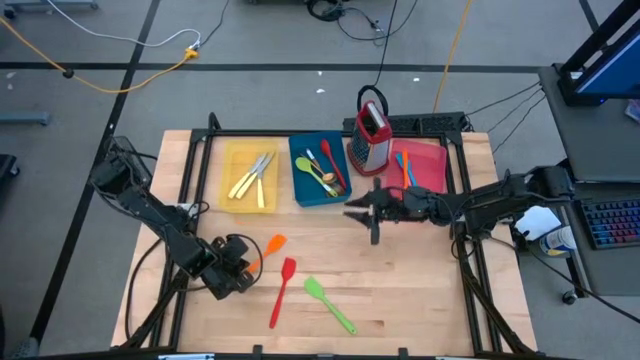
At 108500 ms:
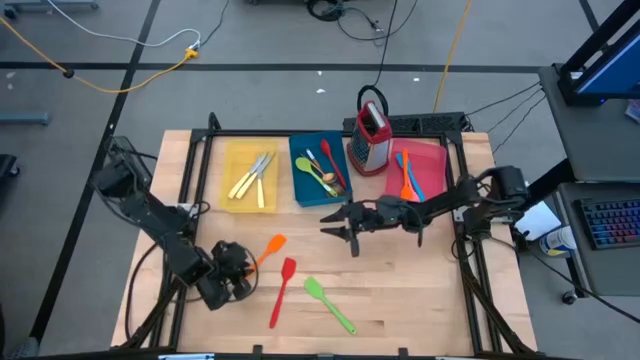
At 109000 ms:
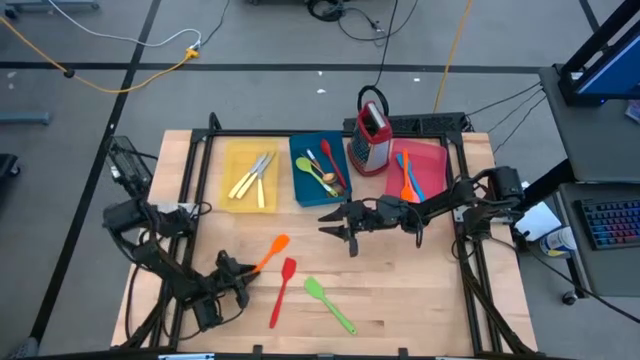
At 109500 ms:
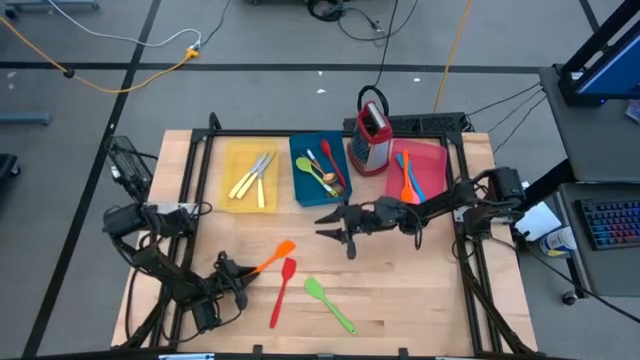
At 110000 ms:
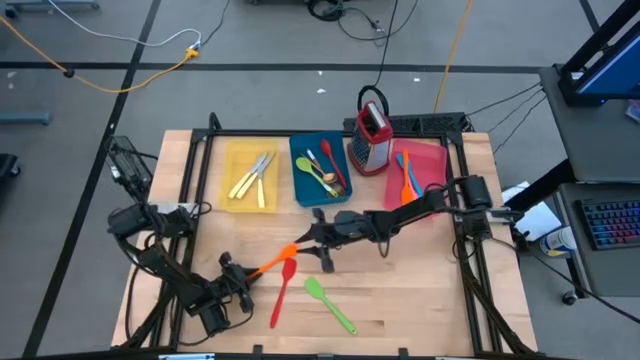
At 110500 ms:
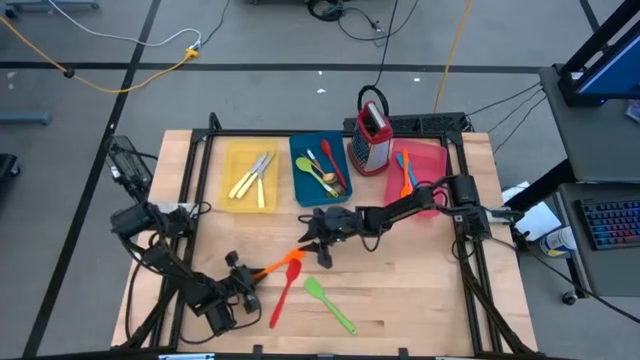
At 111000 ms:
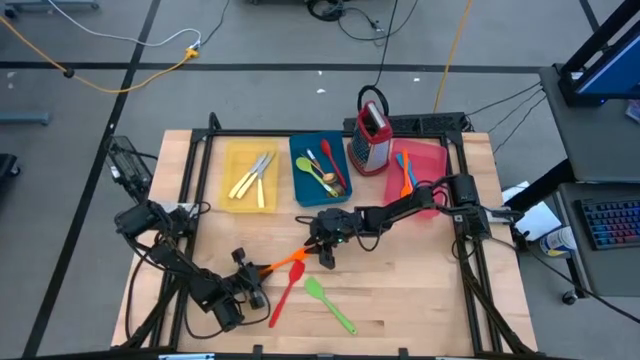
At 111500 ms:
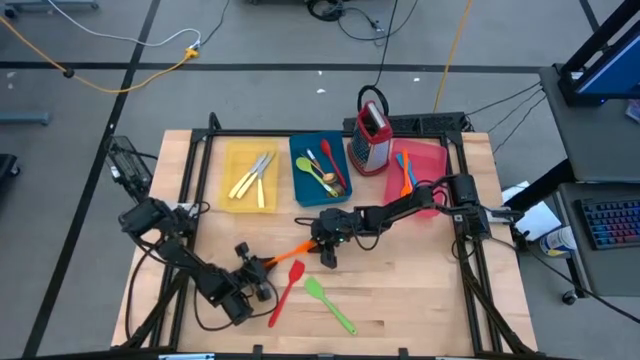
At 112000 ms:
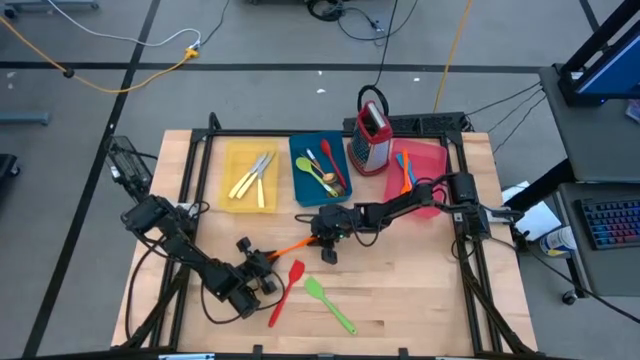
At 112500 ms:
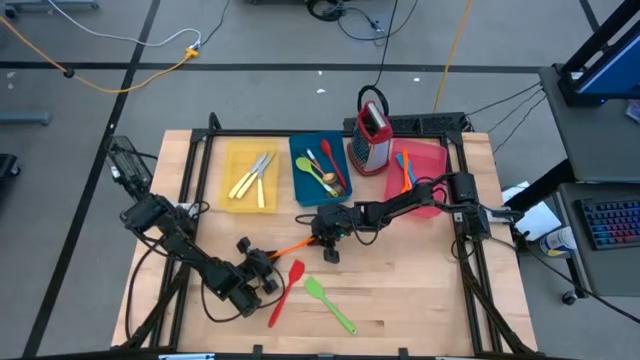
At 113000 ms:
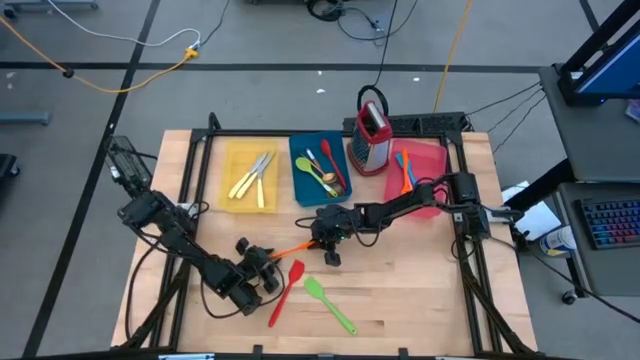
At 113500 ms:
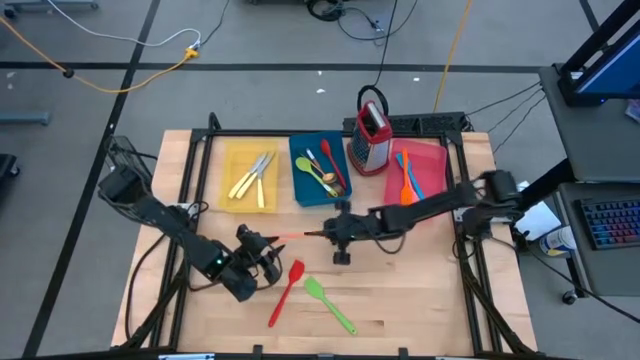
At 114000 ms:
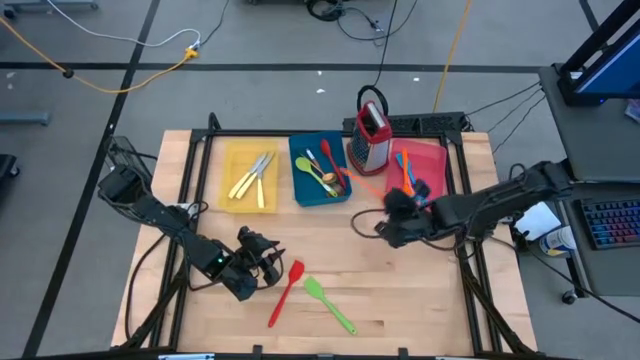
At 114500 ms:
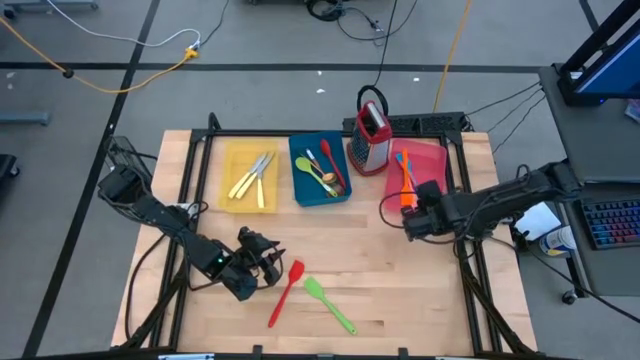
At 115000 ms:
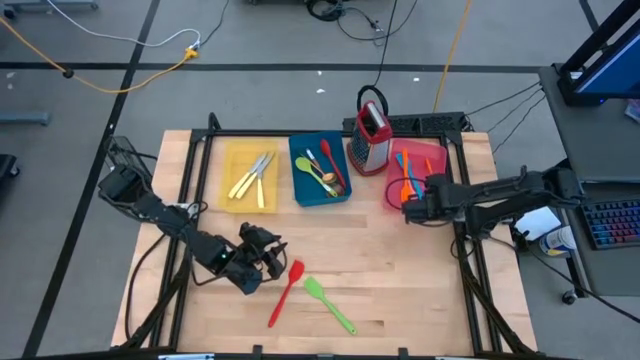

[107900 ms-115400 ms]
Task: Pick & Place Kitchen Items
Put the orange spatula into the pink bin

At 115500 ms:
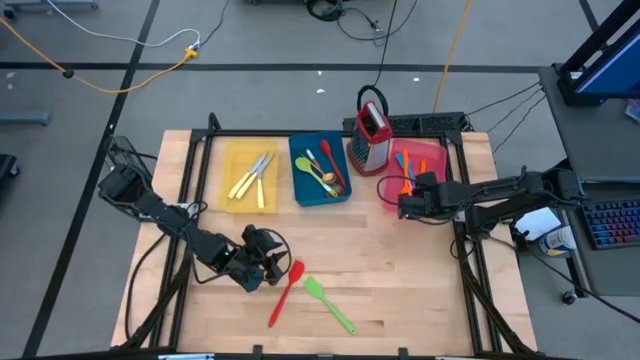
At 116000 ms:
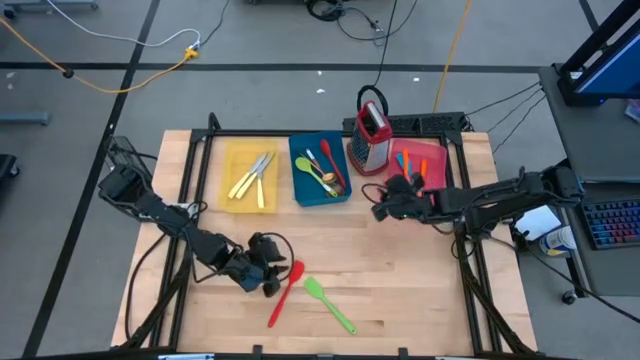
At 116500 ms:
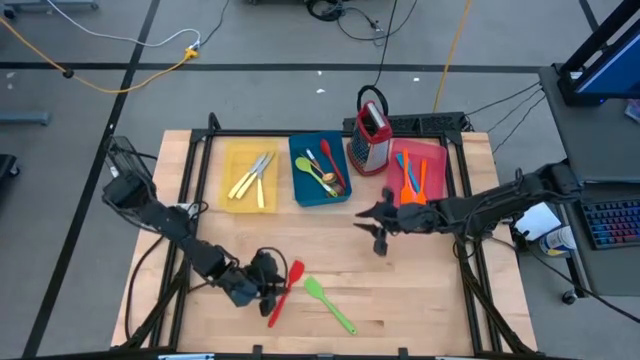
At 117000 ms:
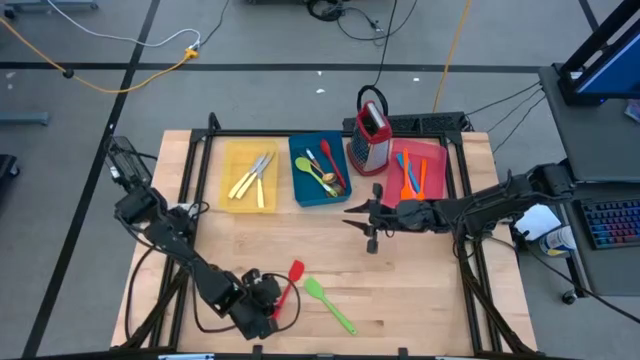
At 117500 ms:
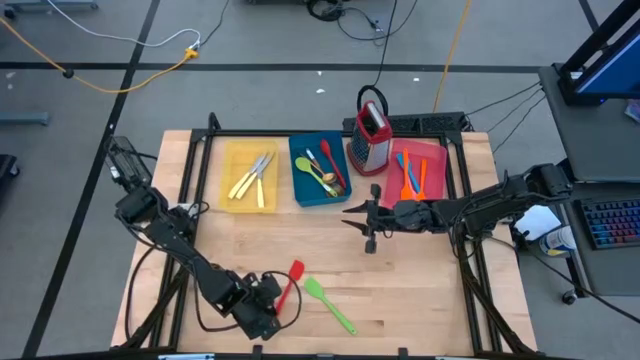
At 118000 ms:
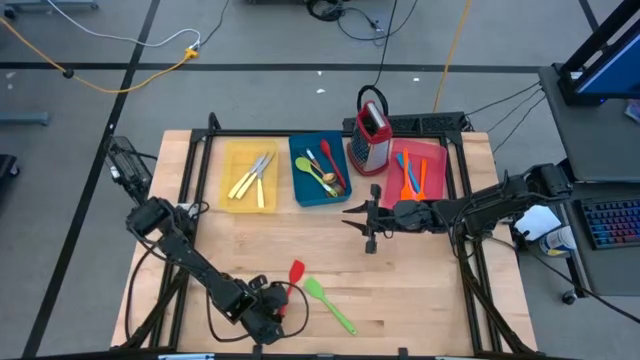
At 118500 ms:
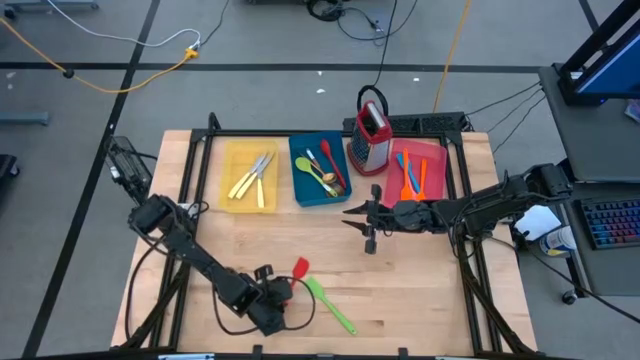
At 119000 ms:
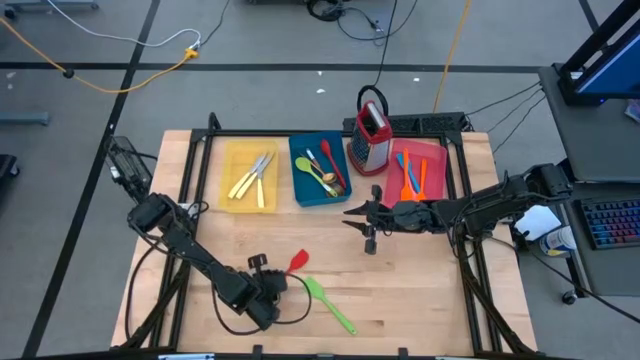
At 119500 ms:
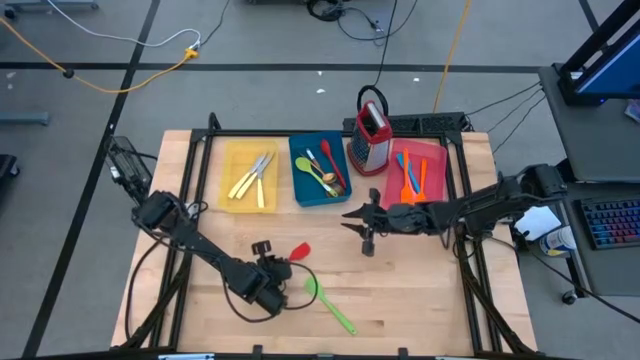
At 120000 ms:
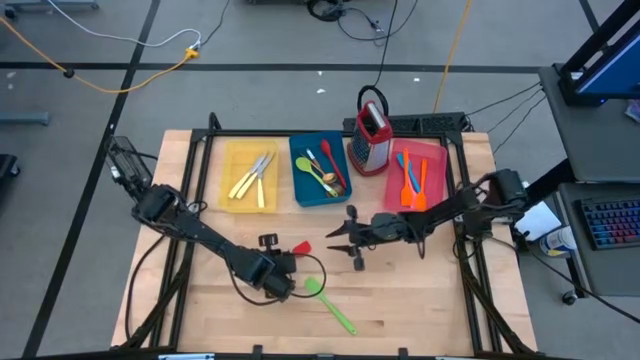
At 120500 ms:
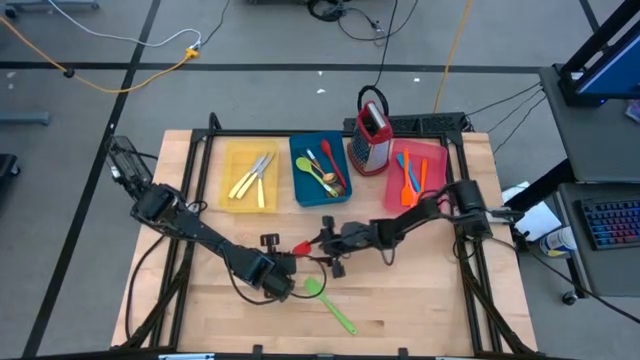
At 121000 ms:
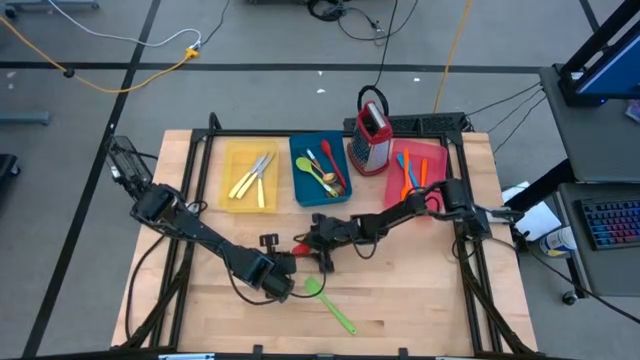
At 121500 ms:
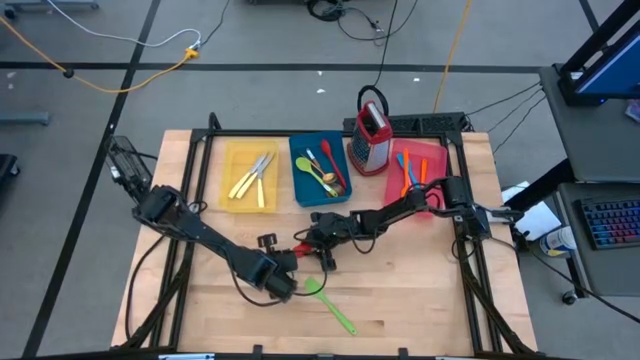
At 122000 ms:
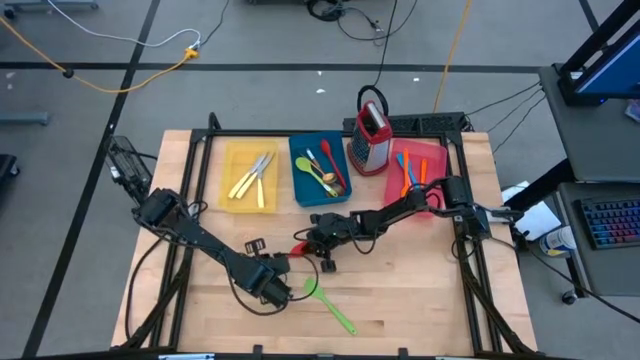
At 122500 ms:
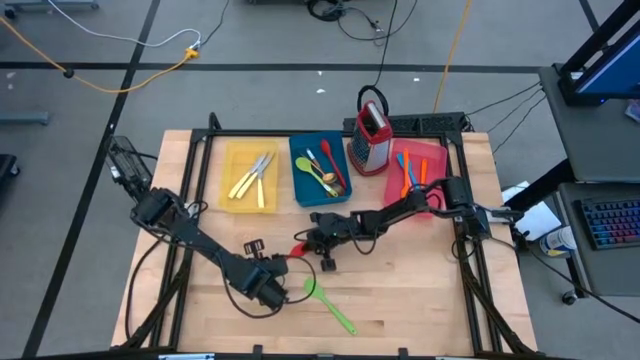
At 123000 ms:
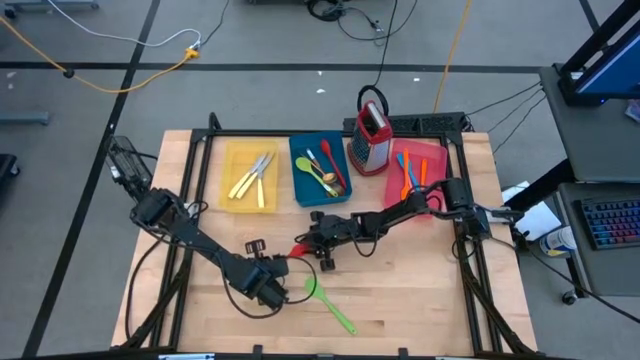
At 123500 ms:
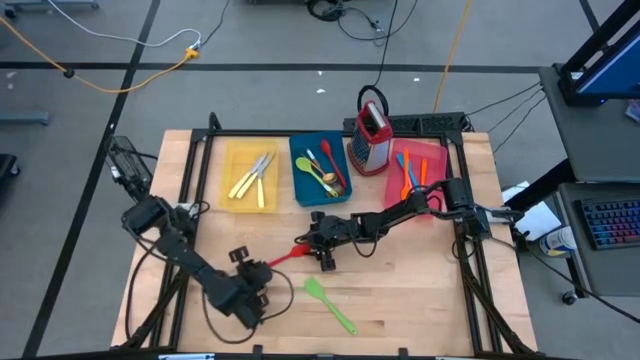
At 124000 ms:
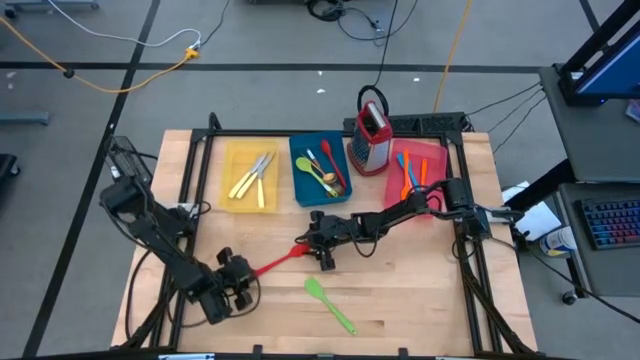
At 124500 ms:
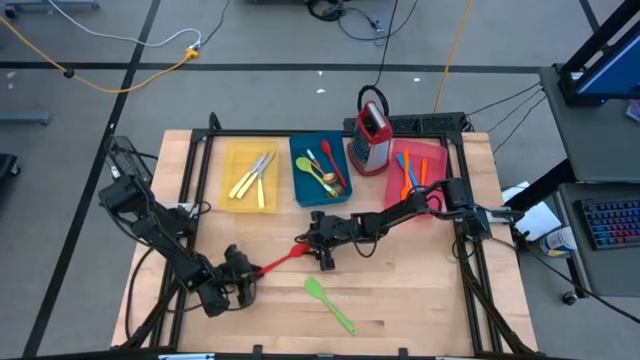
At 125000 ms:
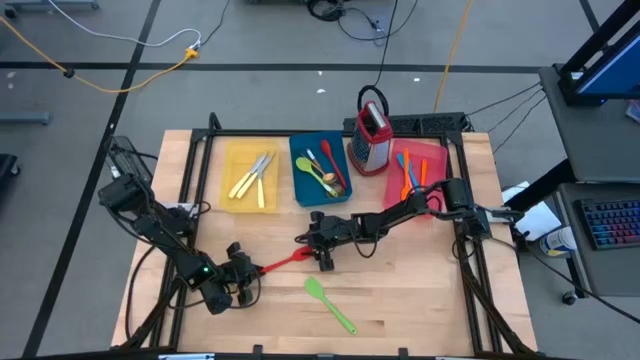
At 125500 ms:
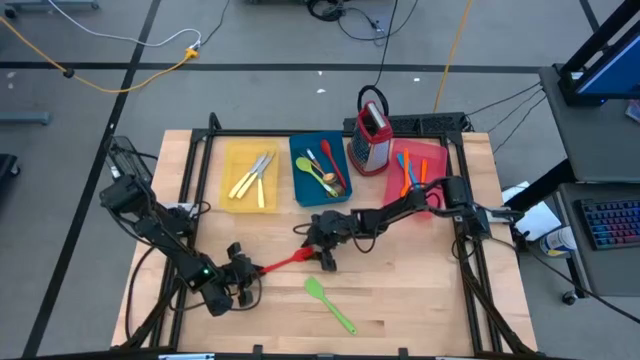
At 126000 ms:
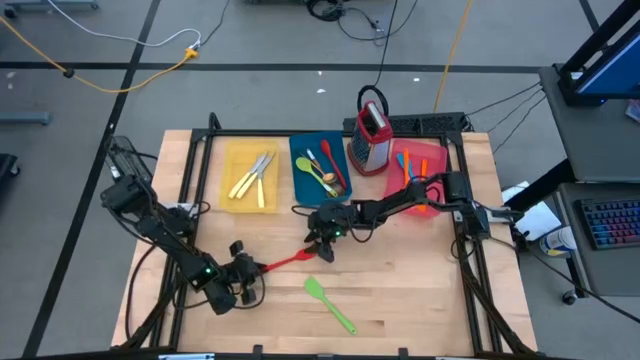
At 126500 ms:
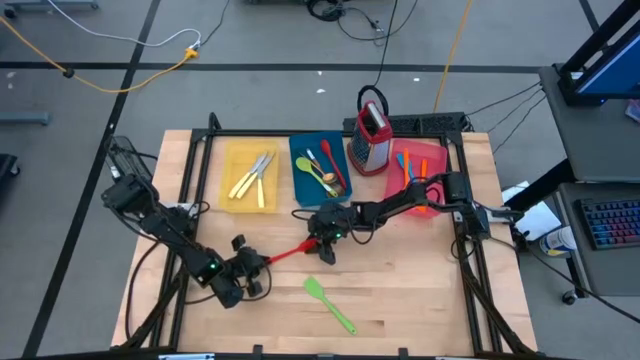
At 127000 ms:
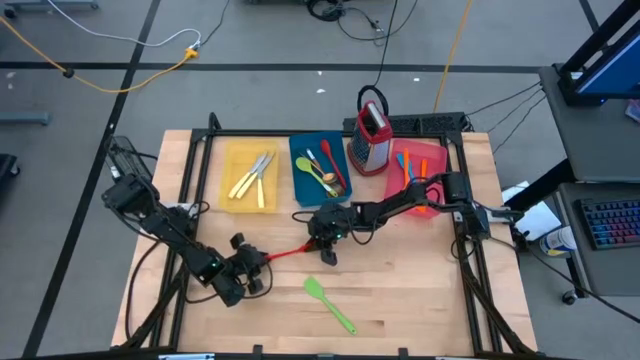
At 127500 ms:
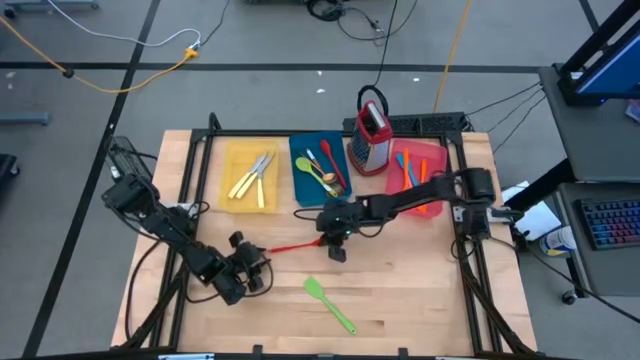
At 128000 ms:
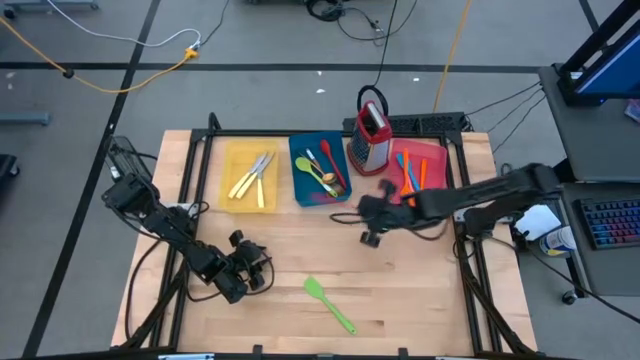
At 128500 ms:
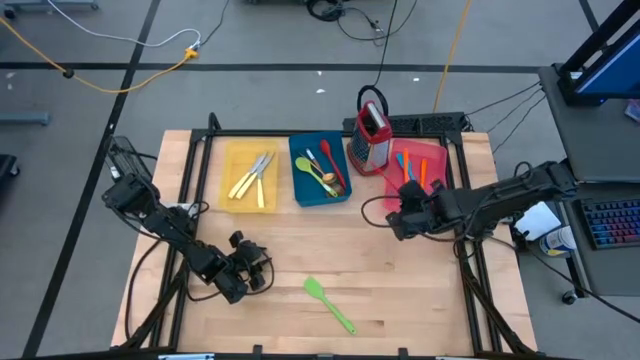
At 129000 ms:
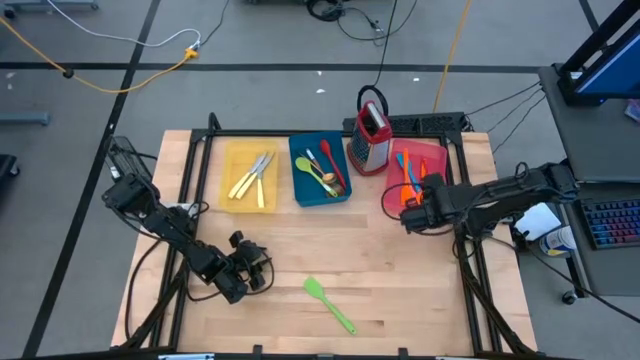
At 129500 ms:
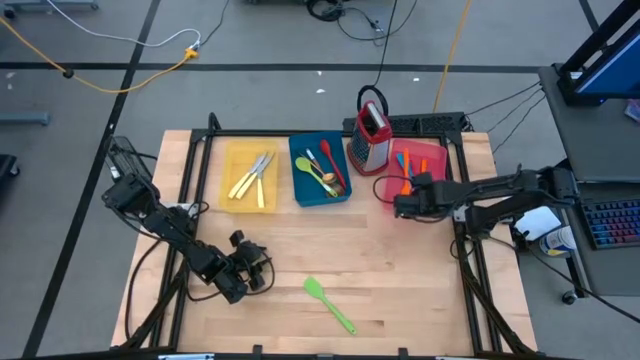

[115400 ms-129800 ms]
Put the red spatula into the pink bin
